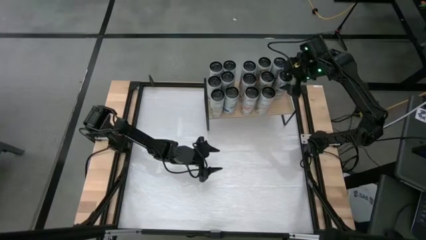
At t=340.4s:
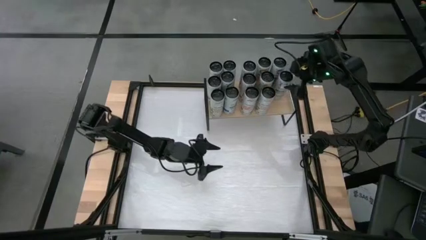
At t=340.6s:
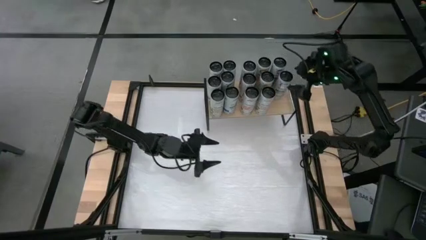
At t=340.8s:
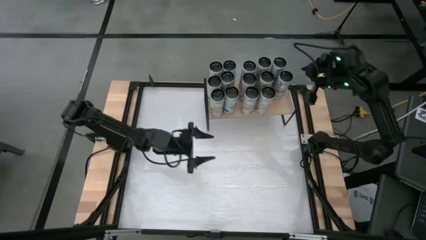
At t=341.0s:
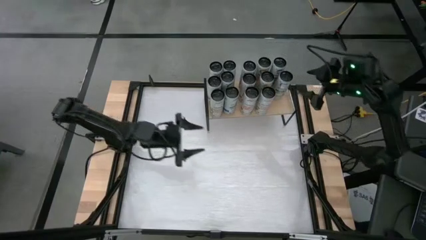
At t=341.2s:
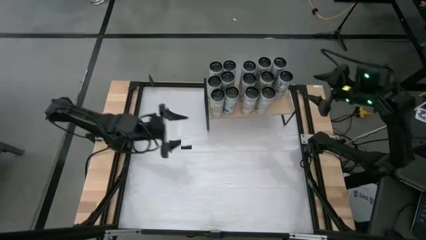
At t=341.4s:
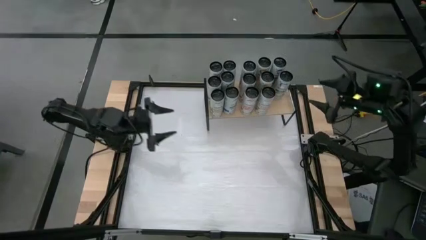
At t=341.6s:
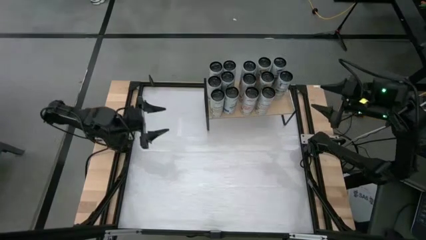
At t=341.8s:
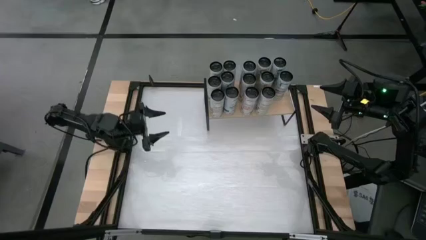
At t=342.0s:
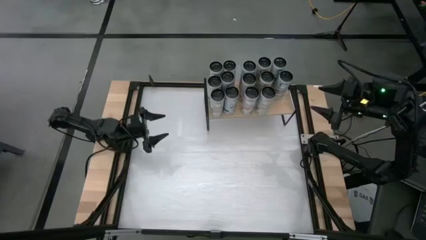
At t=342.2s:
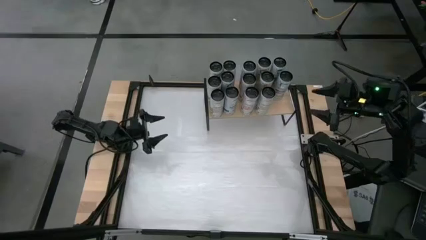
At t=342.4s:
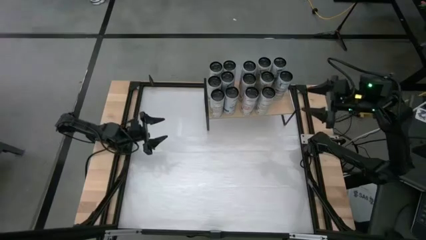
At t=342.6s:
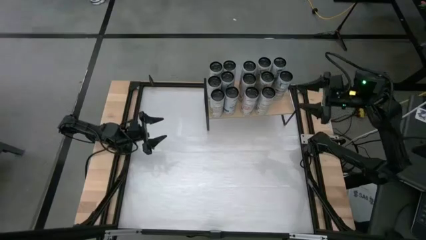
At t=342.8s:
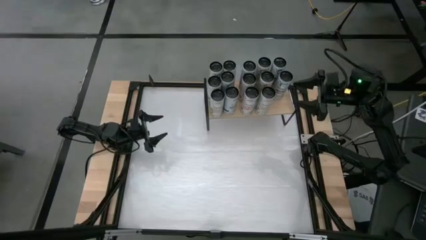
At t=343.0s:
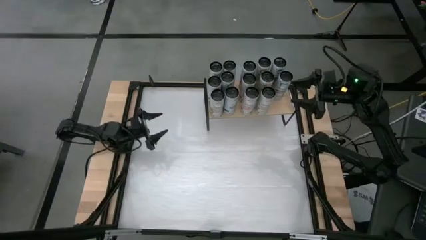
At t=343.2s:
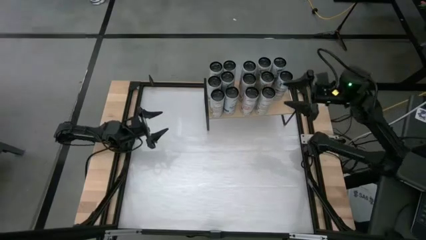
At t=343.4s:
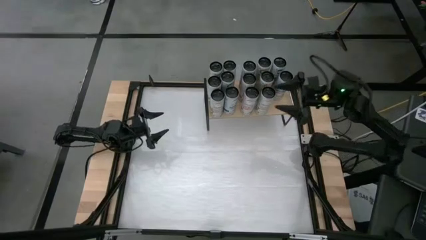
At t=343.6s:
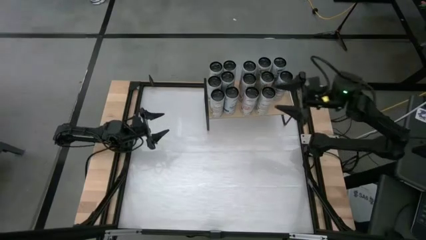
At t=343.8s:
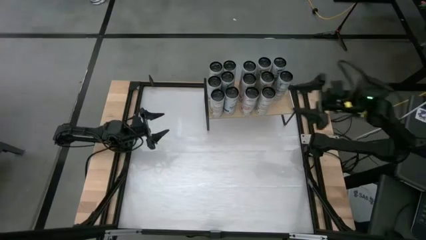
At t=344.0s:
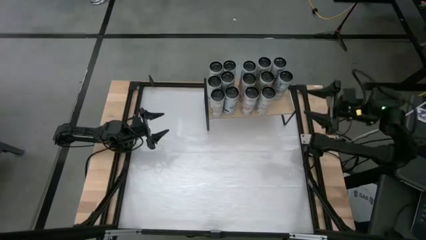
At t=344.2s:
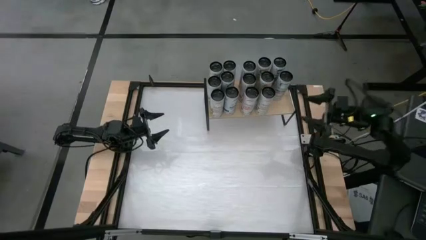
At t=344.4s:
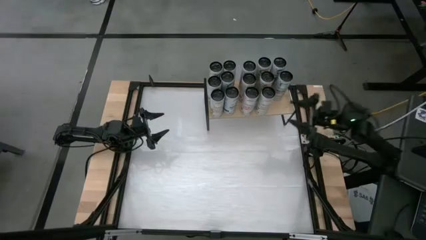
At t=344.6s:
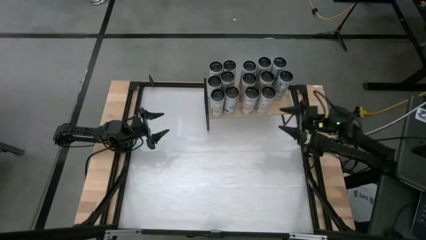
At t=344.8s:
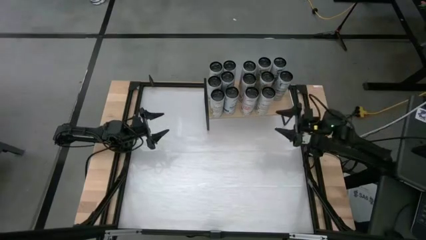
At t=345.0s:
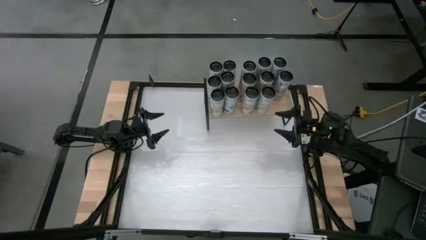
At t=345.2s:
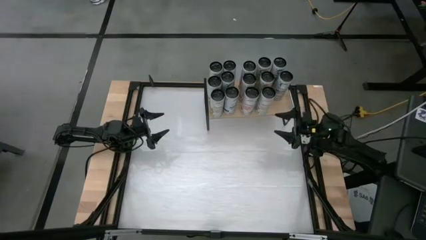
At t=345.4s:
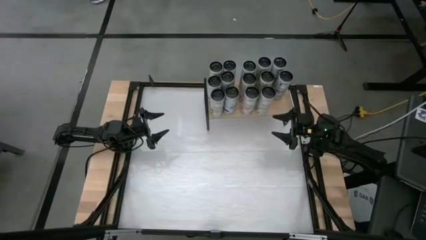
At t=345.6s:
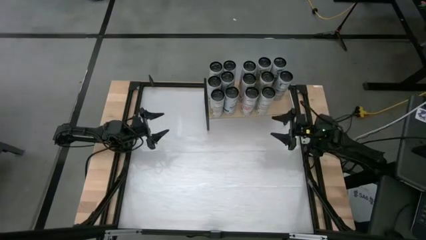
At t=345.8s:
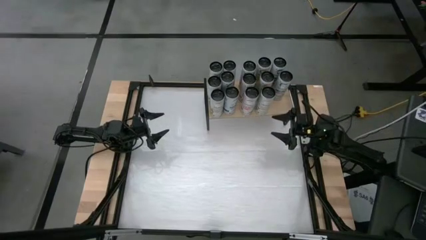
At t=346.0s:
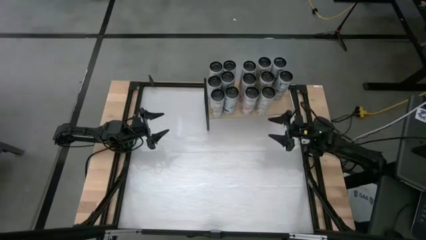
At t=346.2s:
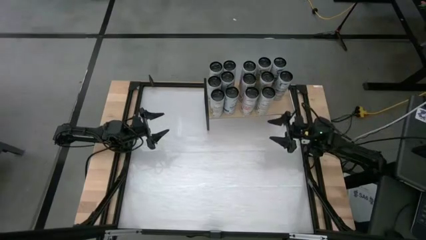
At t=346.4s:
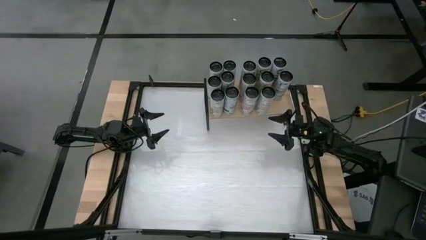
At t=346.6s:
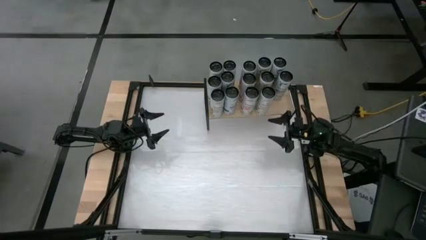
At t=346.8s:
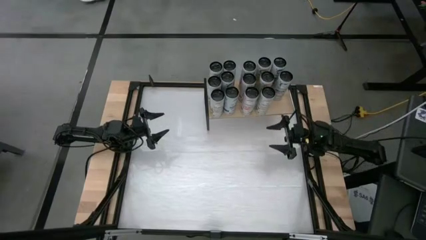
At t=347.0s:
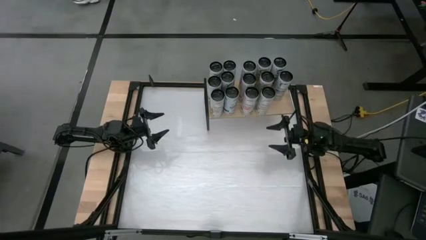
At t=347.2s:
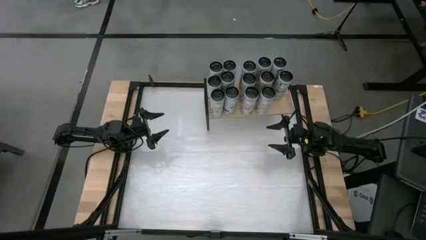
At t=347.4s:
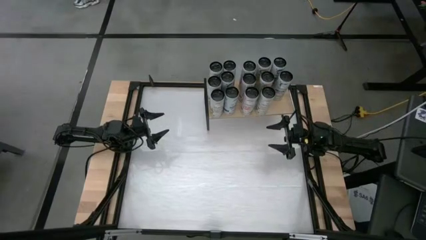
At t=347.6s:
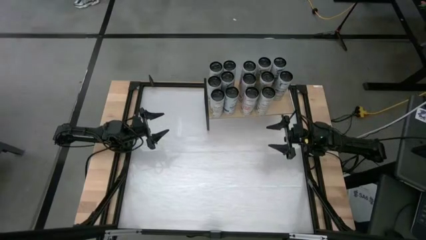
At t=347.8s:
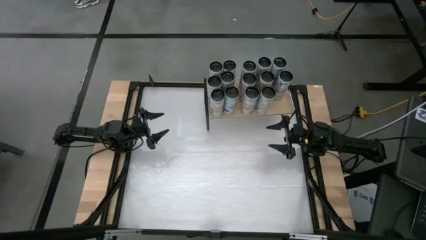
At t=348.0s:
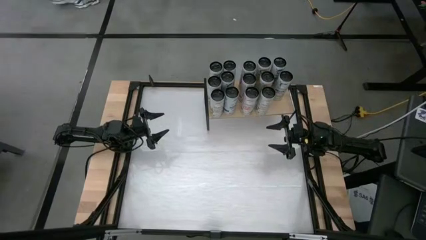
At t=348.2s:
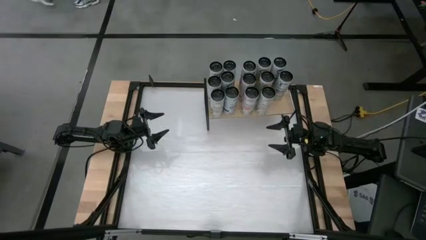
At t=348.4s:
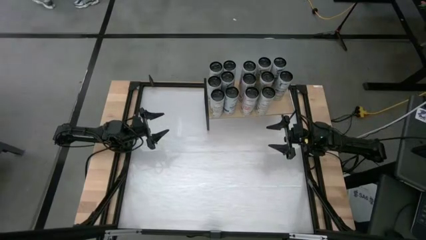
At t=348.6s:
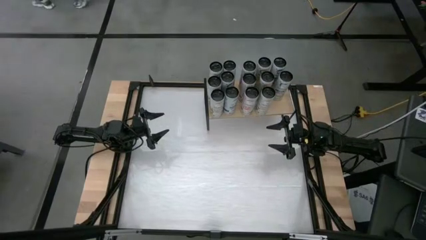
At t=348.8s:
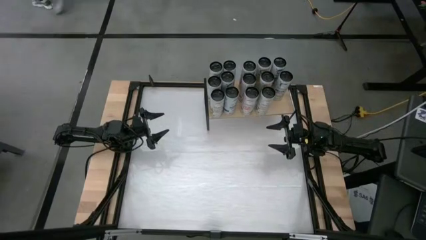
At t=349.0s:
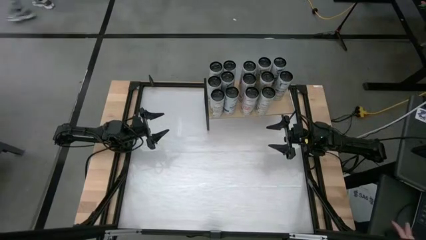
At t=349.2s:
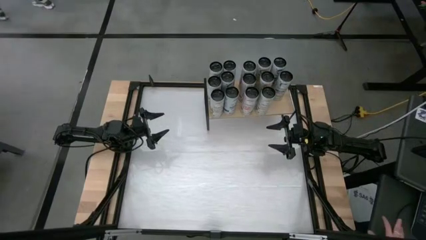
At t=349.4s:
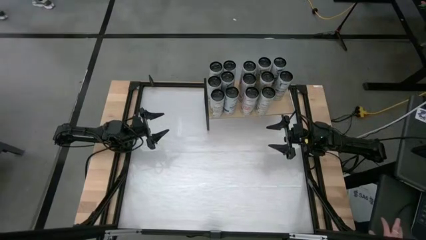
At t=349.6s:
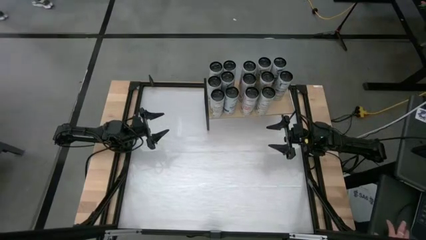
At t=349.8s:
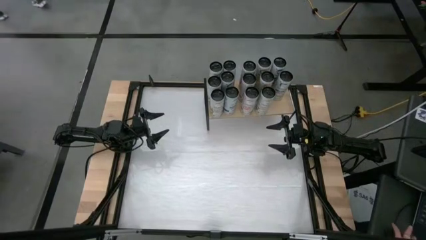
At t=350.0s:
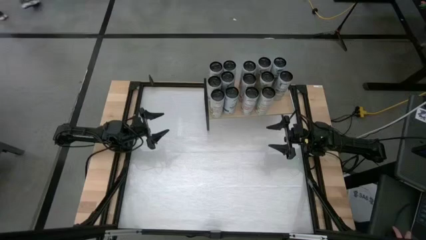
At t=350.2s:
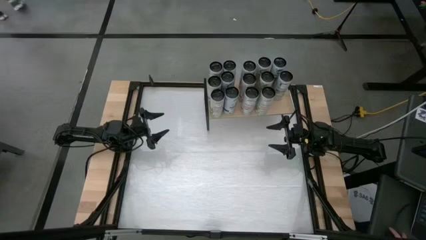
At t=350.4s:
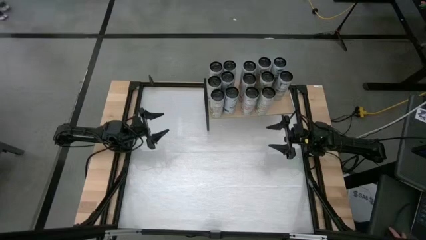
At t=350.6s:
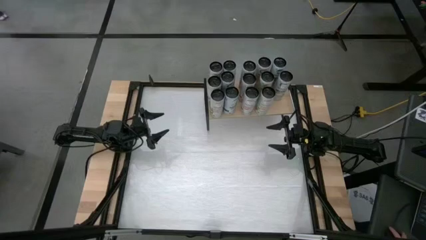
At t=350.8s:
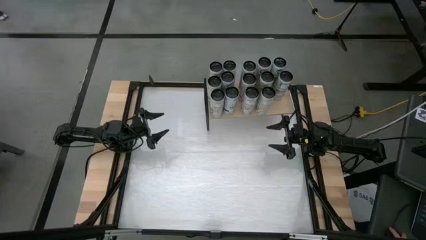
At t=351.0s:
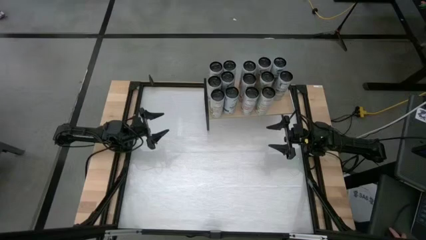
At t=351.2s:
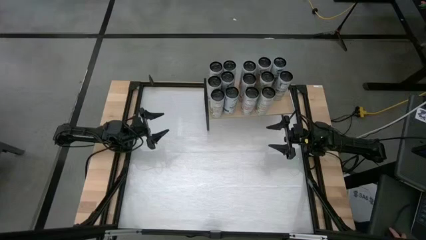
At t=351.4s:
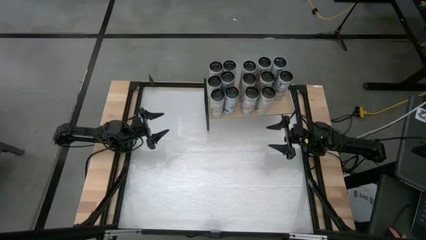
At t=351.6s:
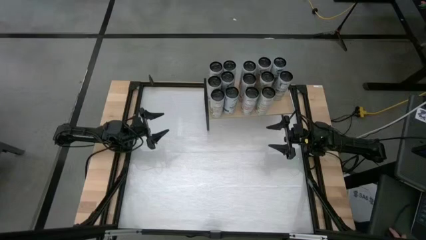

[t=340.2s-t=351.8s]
Task: Place canned beverage on shelf
Return to Home Position

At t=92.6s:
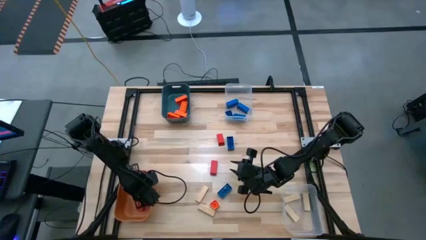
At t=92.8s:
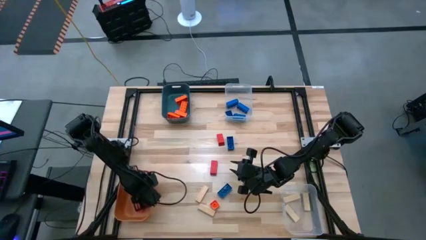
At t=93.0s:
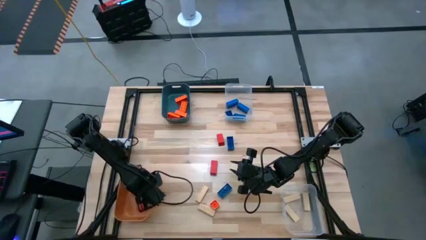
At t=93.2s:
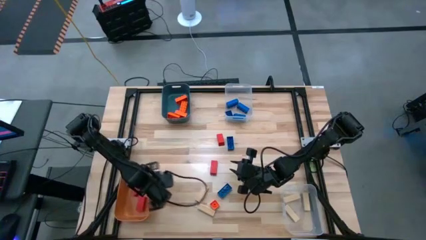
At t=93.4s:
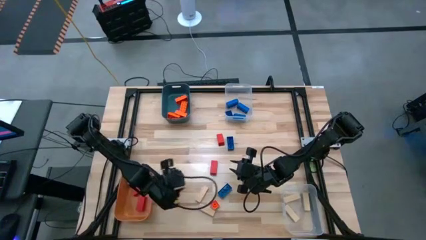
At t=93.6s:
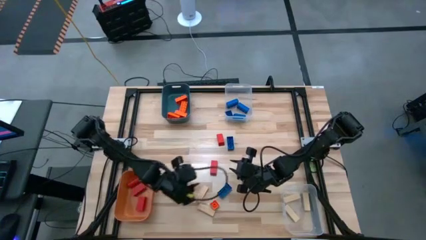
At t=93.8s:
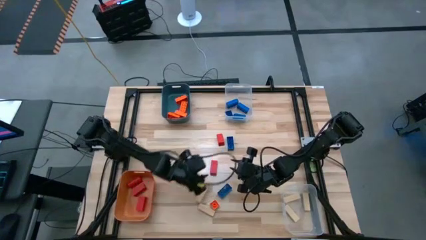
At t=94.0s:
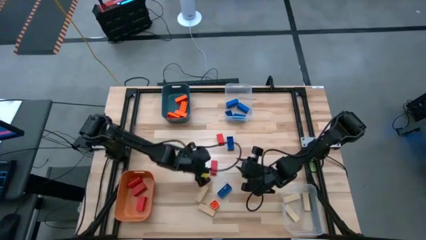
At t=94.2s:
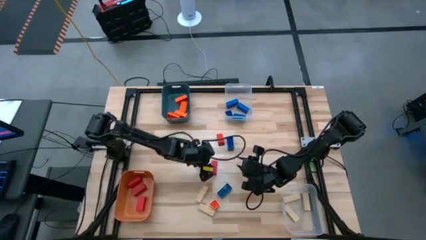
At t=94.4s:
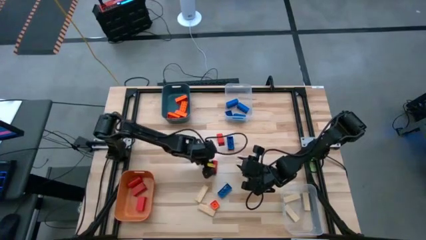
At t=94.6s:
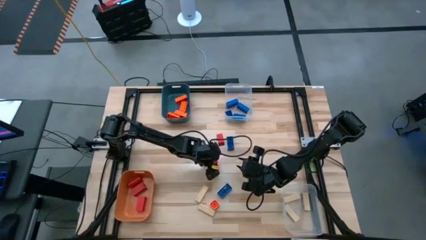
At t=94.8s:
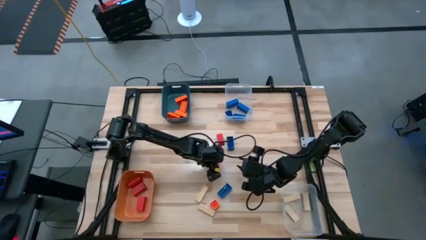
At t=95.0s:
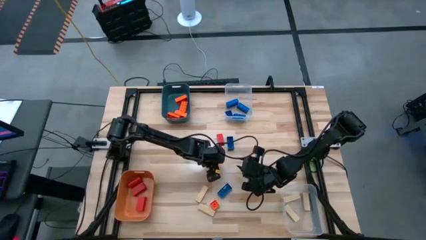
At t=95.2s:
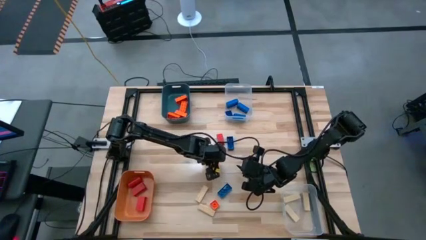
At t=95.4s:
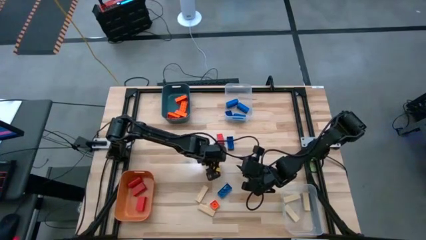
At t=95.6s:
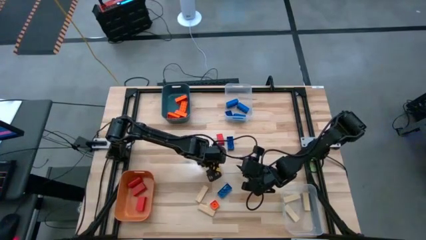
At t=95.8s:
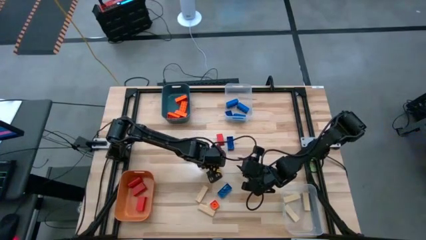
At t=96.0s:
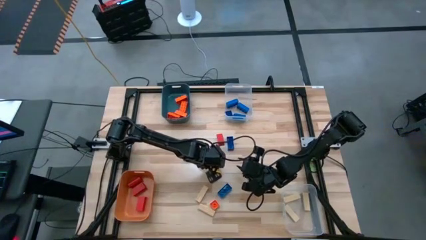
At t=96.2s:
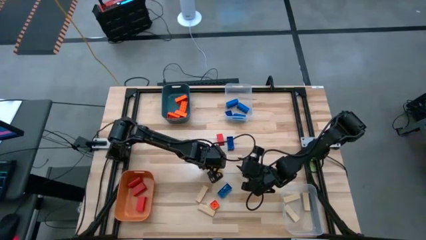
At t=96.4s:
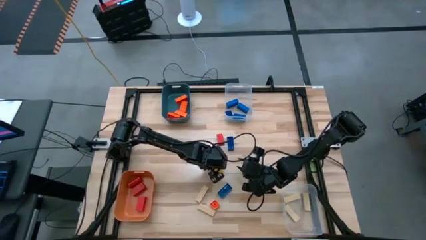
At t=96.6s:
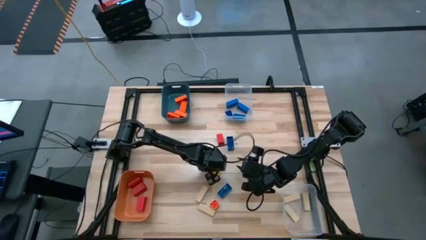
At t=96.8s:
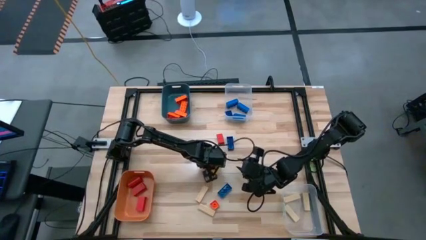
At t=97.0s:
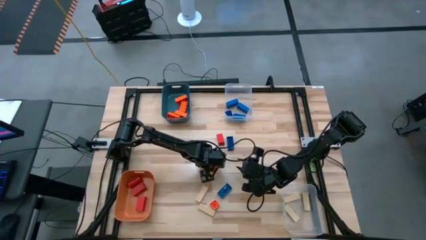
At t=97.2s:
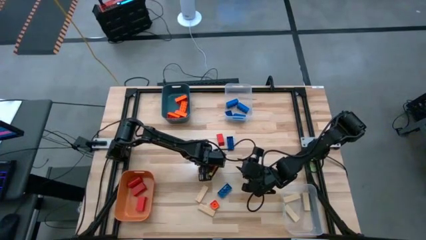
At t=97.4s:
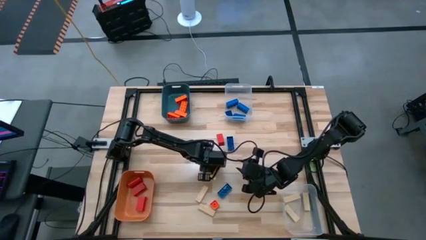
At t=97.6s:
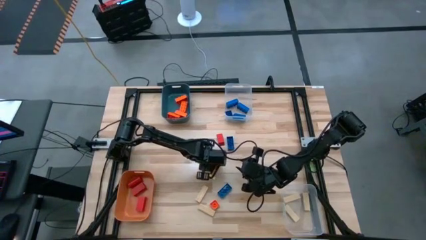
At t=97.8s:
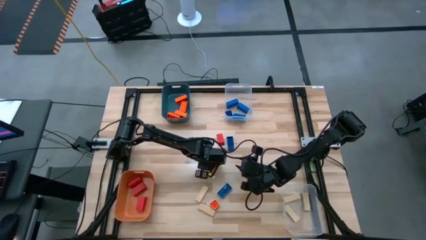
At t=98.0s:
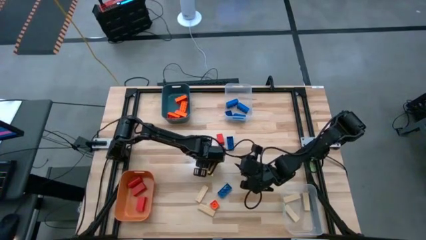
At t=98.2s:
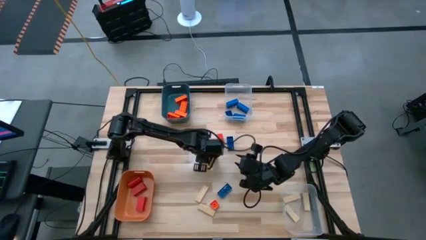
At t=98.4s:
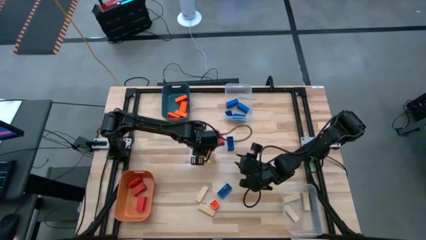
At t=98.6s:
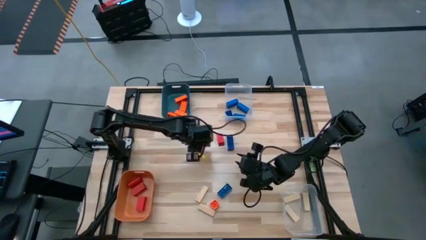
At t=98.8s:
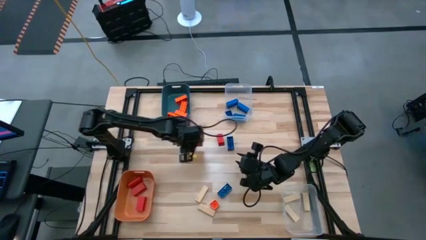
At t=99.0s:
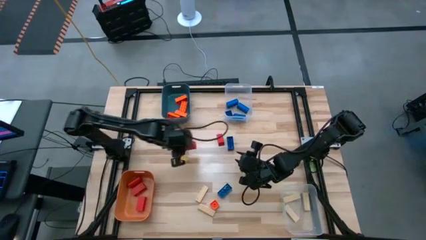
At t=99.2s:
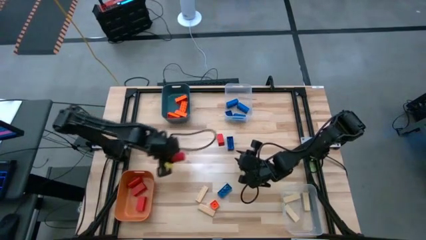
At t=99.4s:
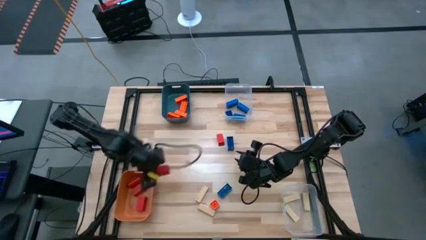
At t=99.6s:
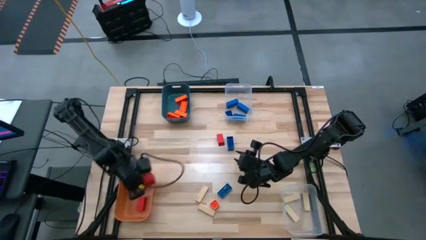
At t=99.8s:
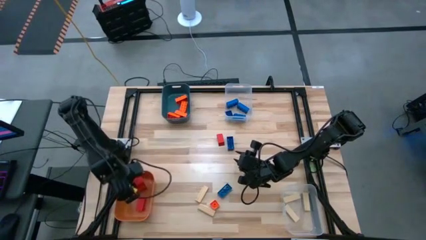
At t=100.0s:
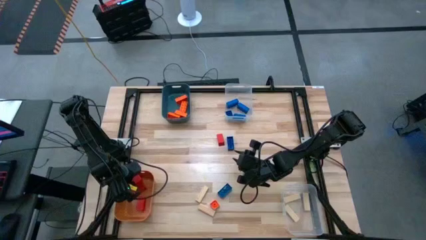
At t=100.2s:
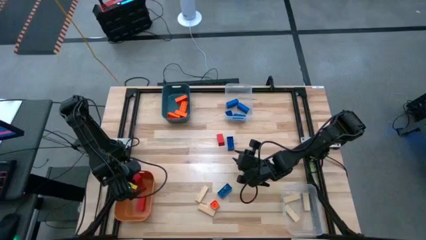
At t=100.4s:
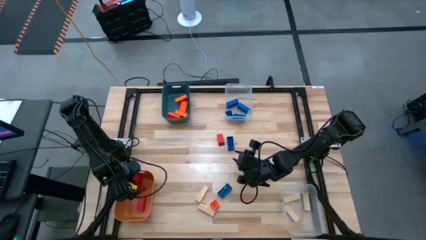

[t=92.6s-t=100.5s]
Task: Sort blocks
Put the red block into the orange bin
